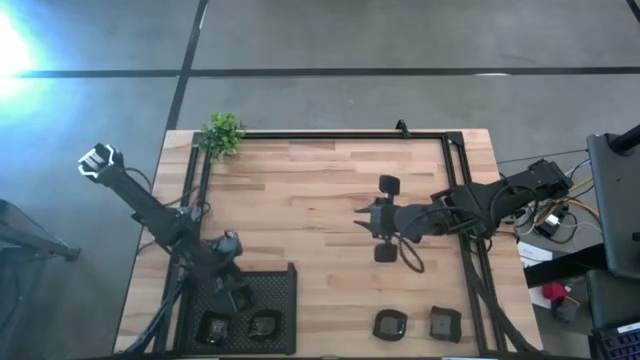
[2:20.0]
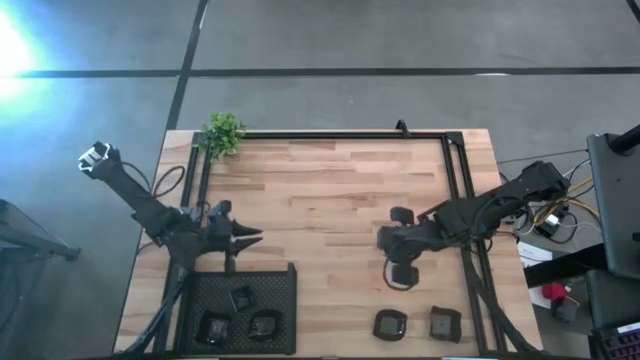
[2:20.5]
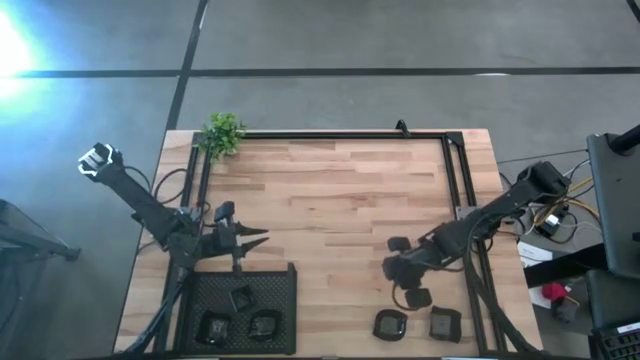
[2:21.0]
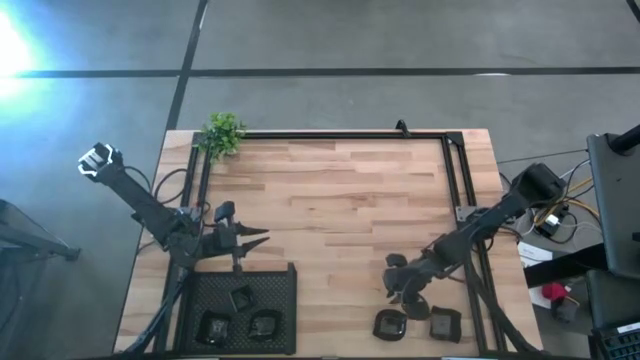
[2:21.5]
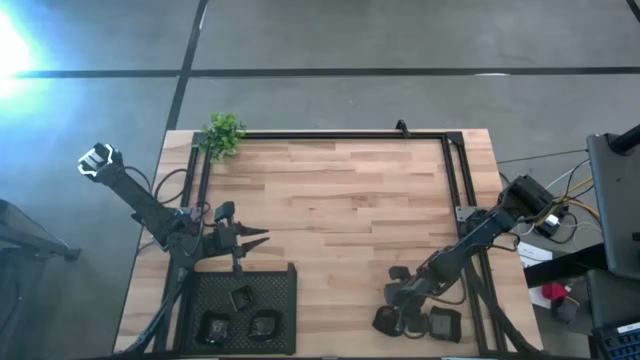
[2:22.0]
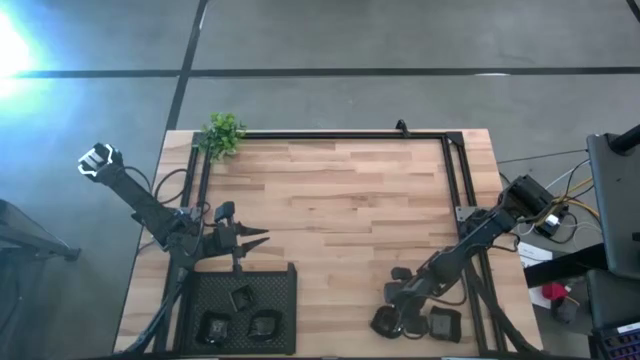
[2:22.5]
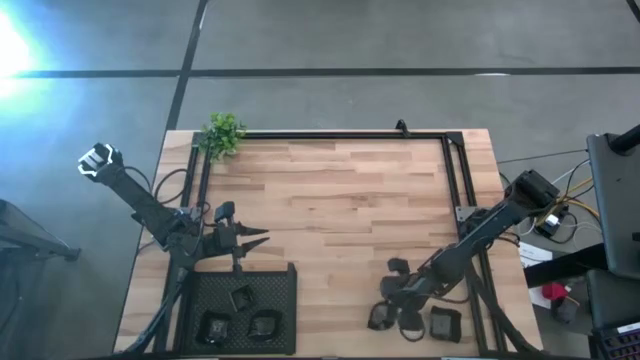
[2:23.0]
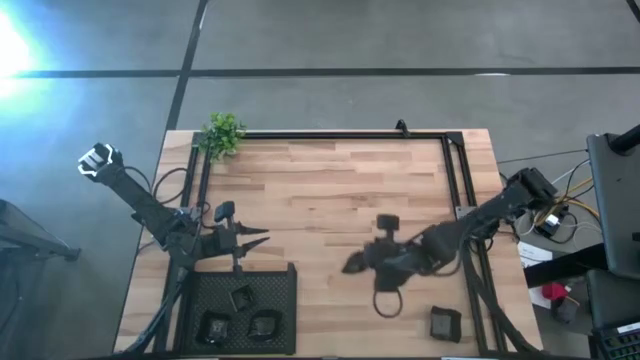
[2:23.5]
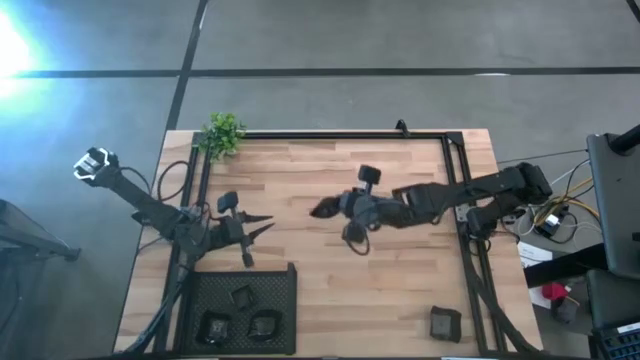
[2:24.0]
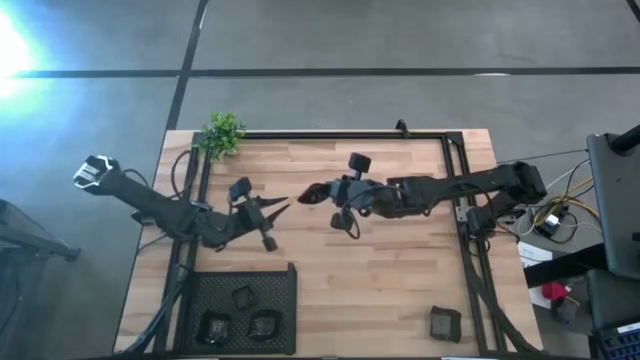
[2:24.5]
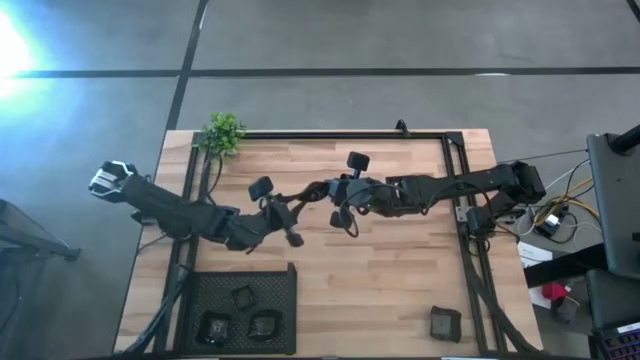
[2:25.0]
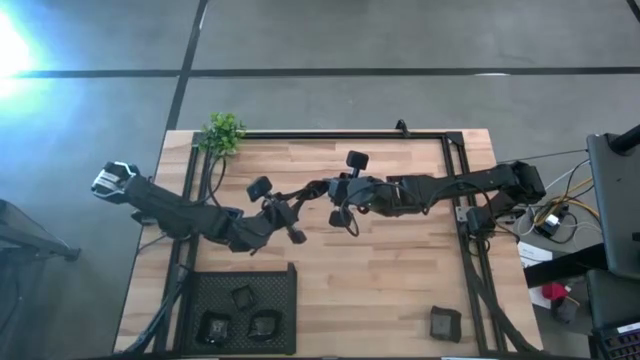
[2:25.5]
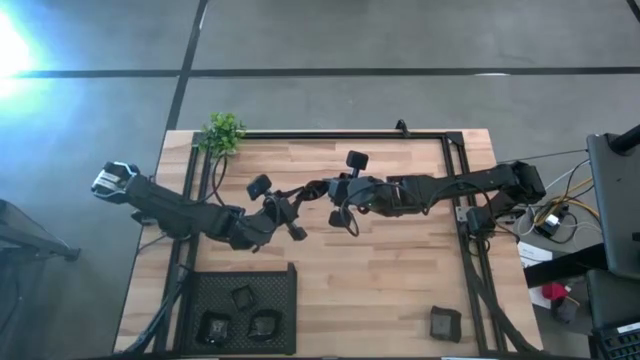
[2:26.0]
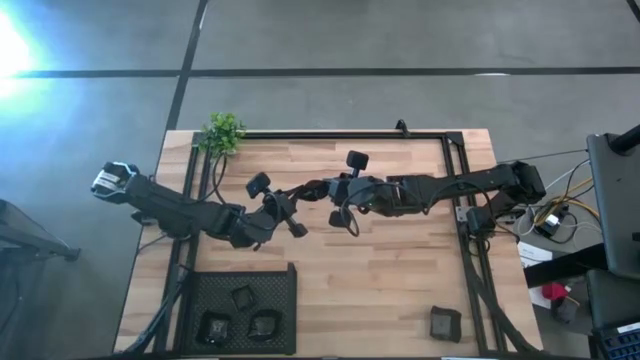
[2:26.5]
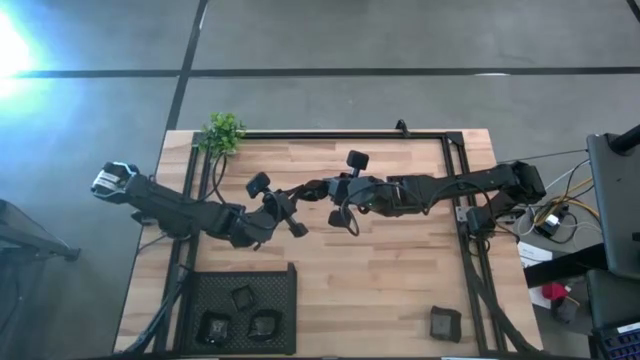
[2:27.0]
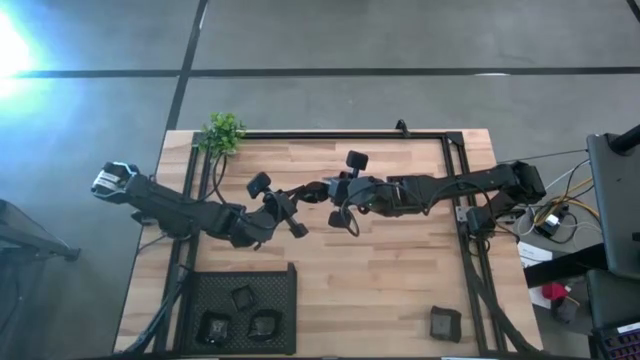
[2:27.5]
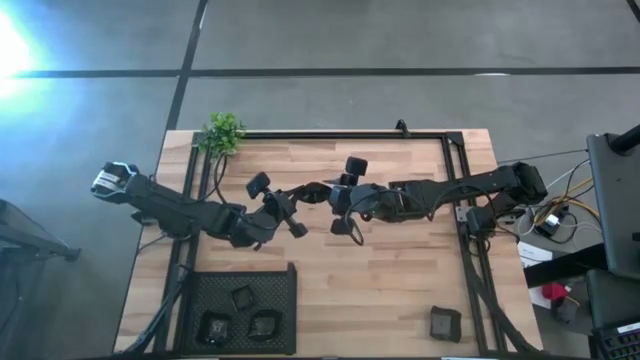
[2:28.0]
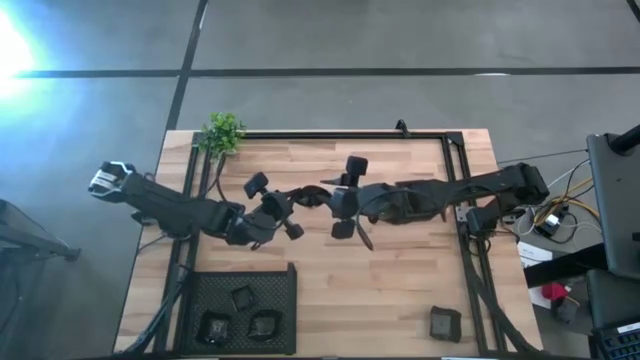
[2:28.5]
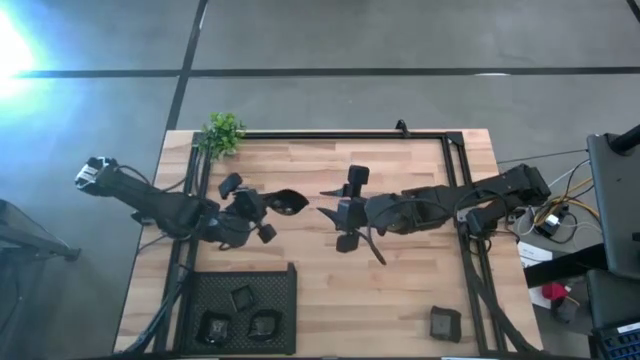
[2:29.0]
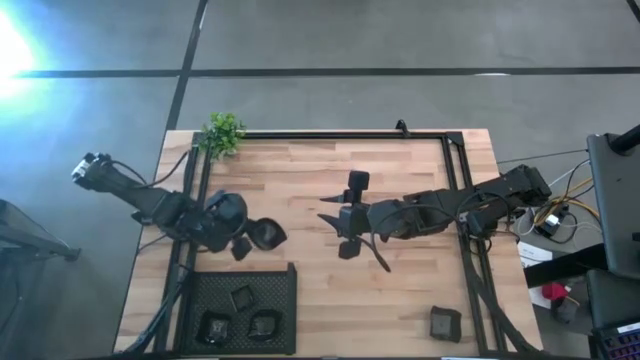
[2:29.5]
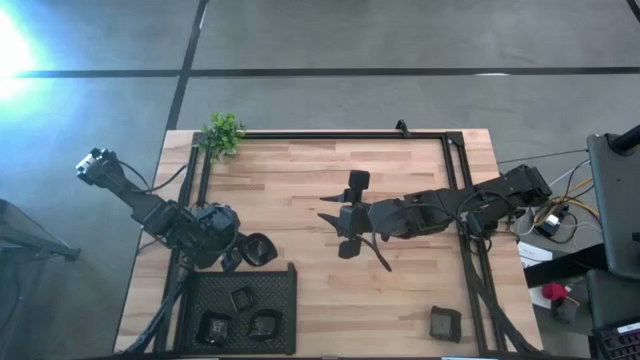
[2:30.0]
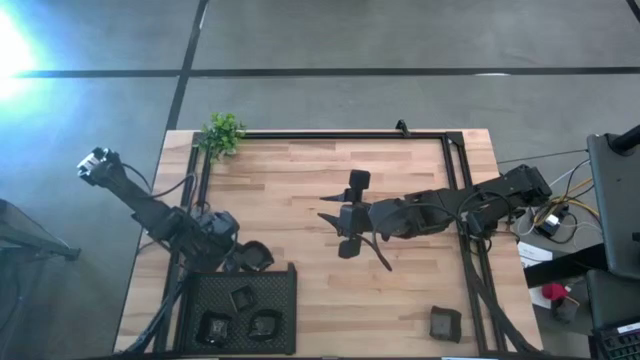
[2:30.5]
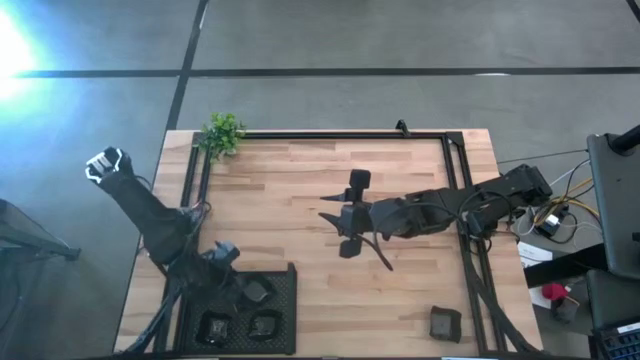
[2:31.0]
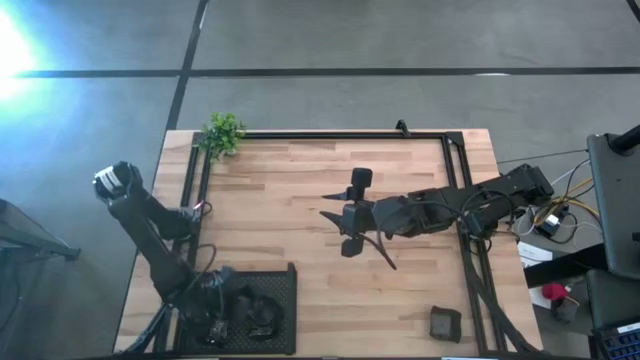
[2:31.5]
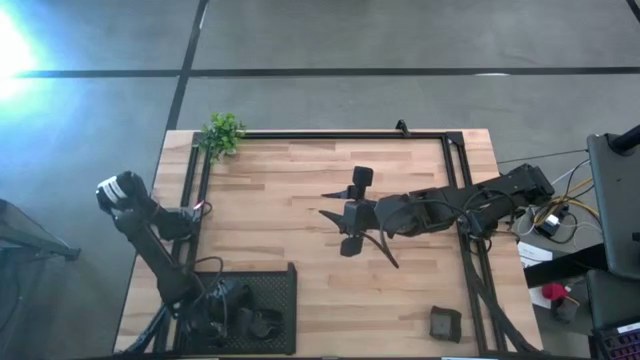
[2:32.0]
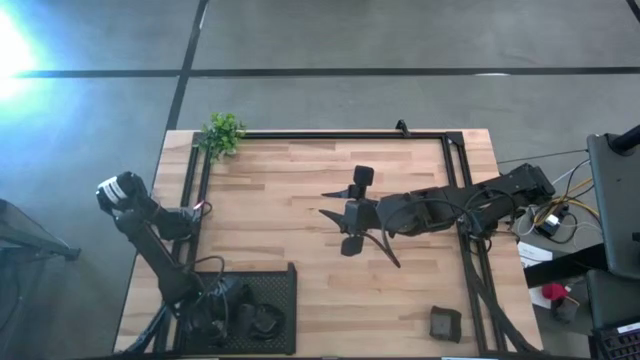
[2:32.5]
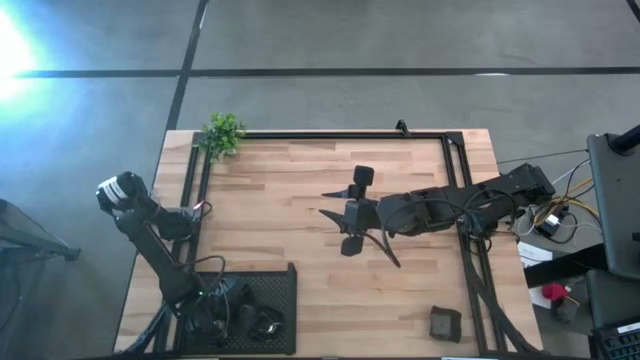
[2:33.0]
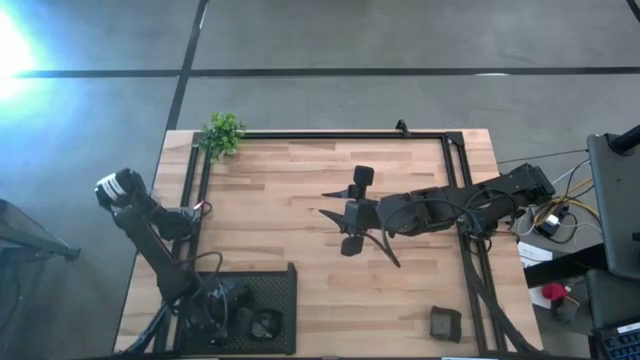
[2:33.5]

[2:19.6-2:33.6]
Task: Pick & Place Mini shaped plates
Stack the leaf shaped plate on top of the leaf shaped plate on the shelf

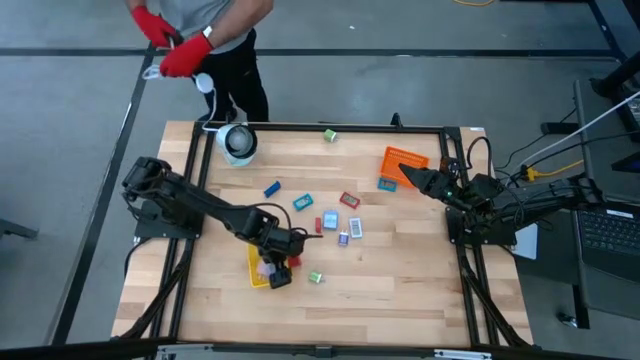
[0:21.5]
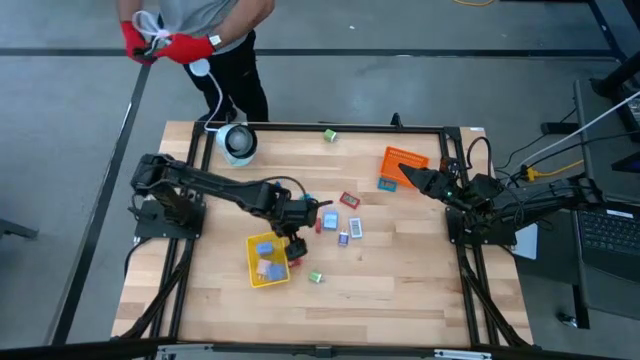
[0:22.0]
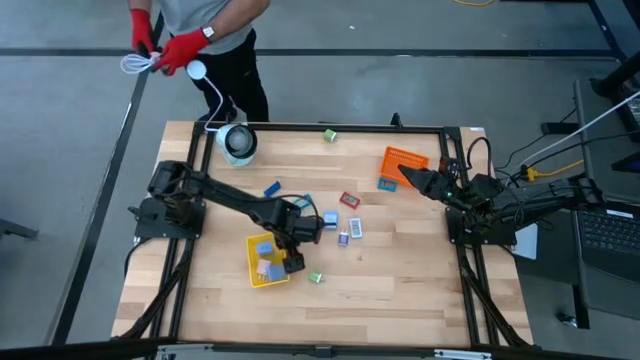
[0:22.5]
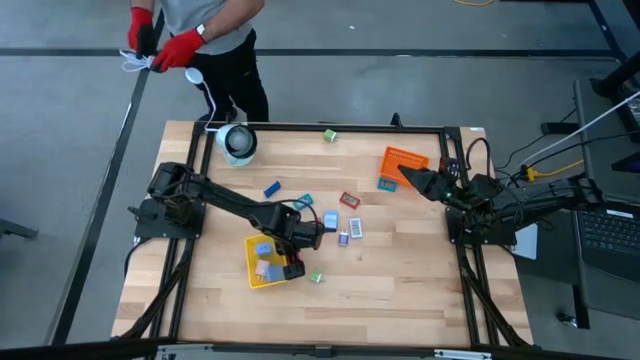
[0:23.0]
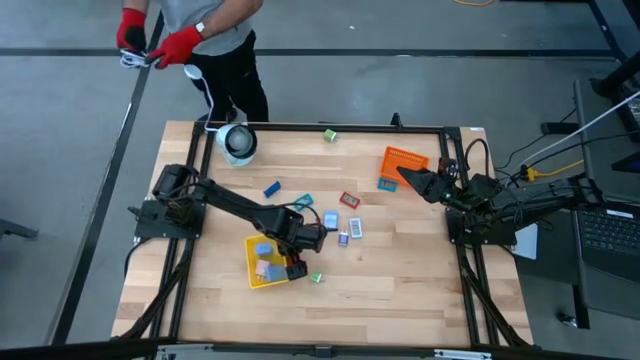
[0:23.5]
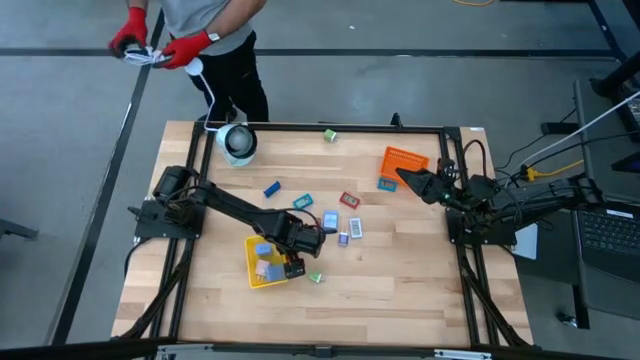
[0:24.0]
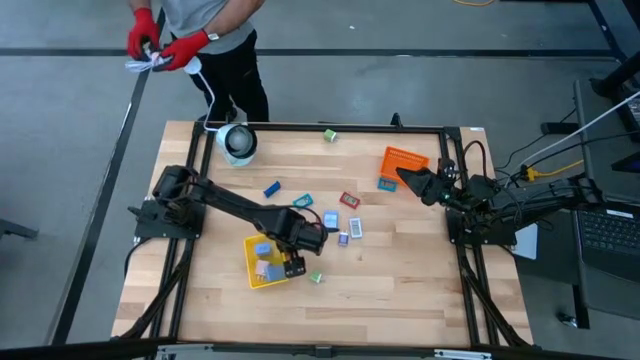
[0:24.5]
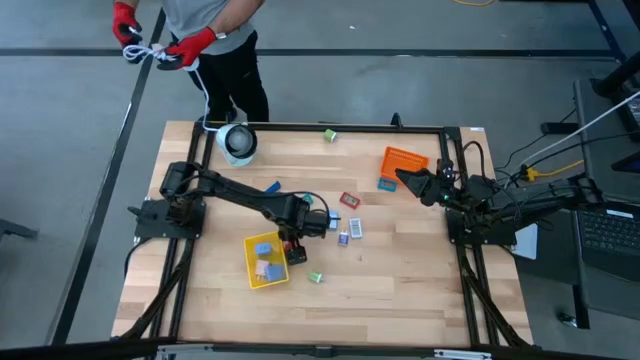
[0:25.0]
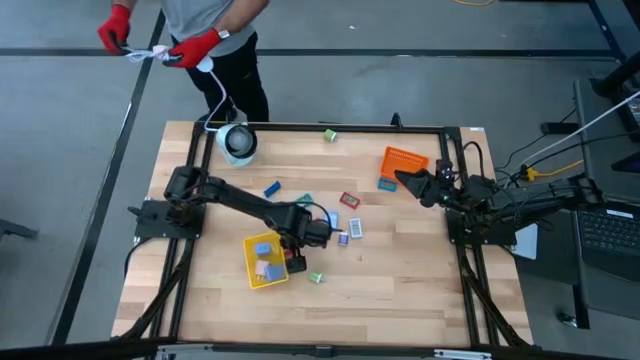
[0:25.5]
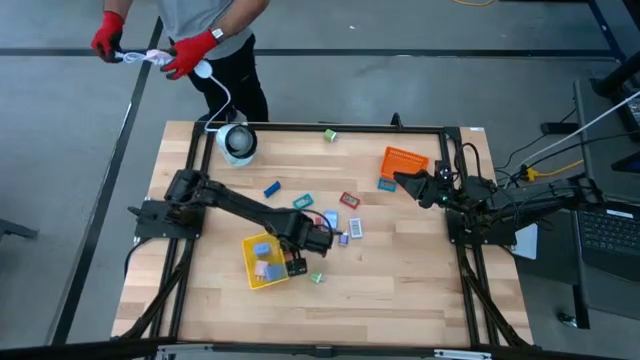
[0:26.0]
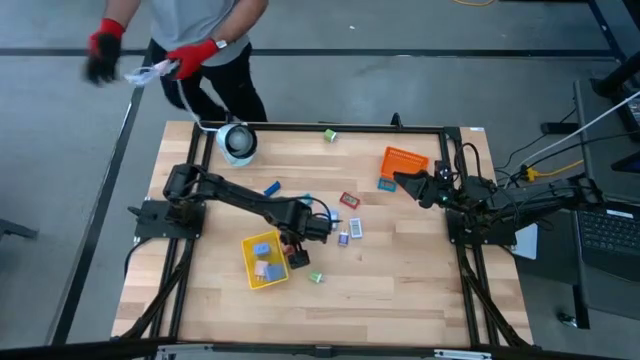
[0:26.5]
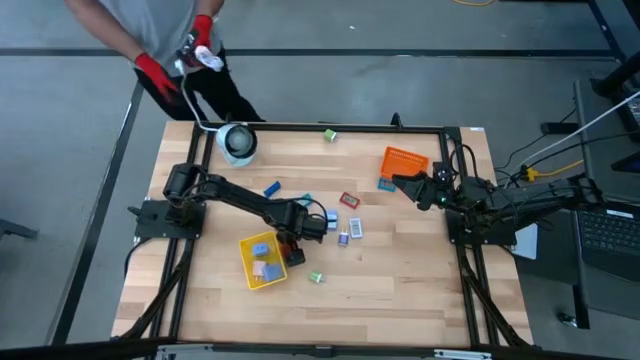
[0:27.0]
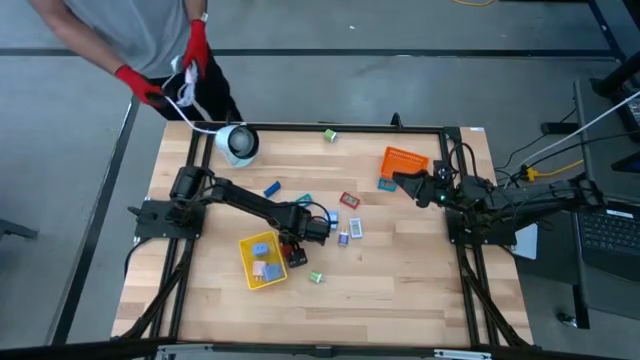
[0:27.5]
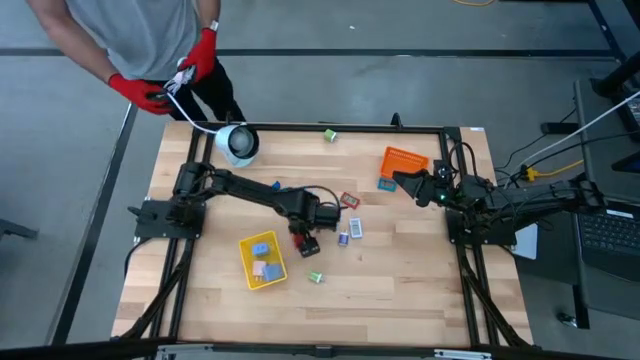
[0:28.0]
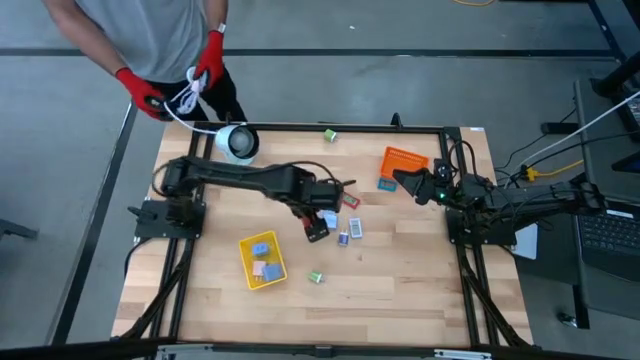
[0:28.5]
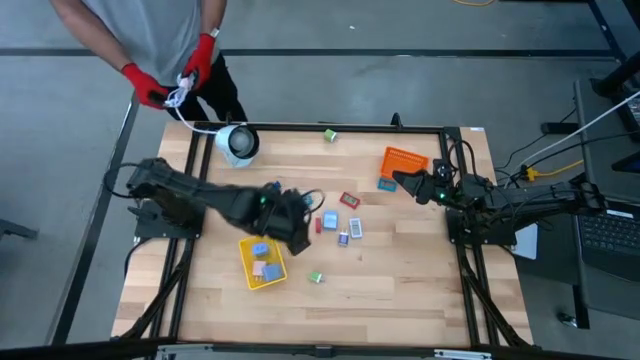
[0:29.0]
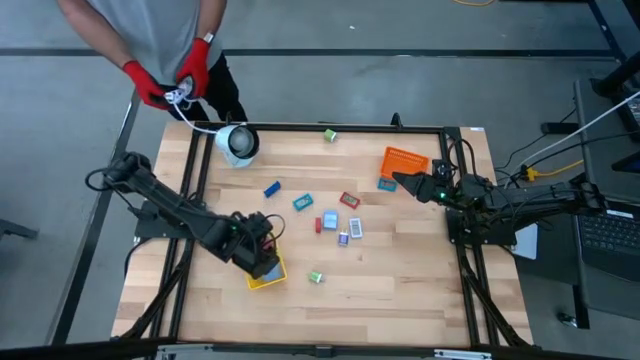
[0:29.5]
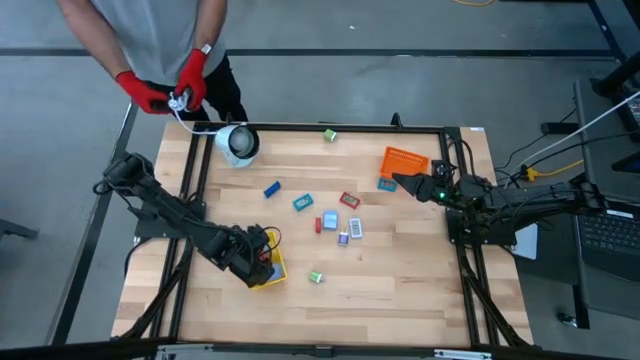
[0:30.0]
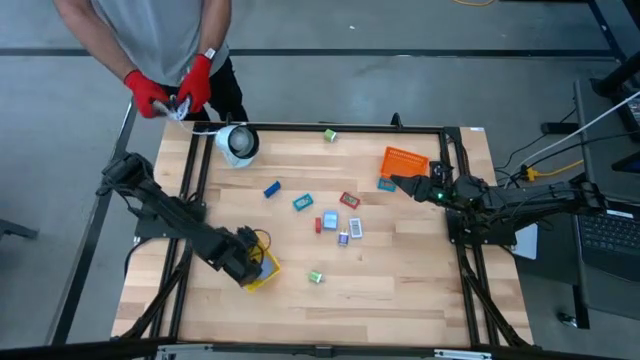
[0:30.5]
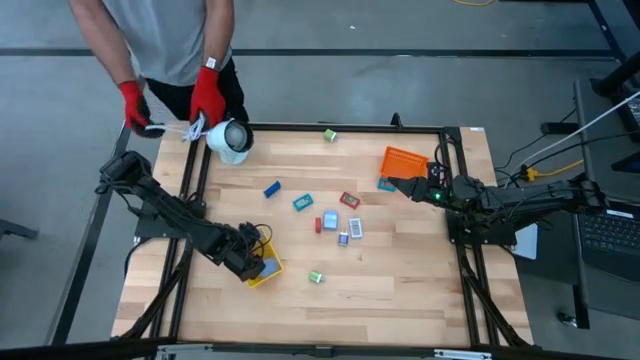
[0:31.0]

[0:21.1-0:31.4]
Task: Pick & Place Office items
Put the red charger adapter into the yellow bin
